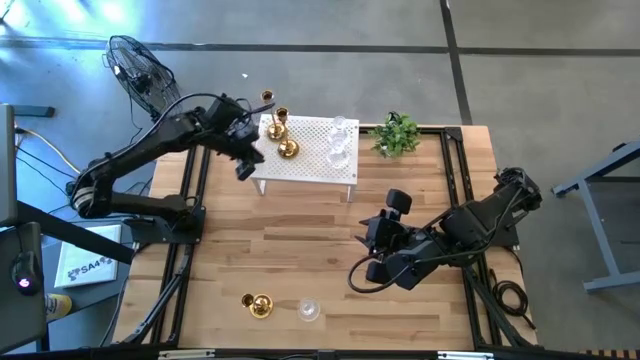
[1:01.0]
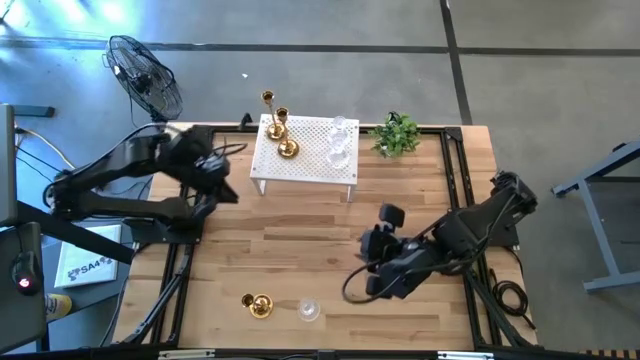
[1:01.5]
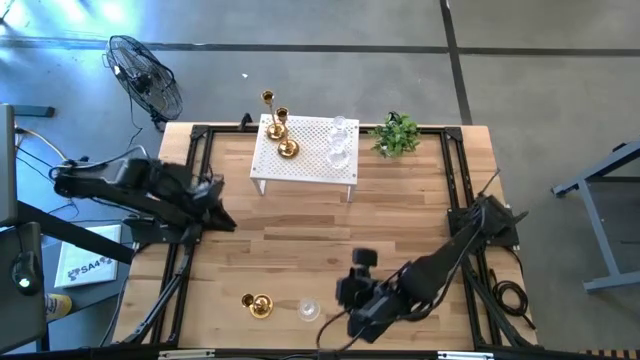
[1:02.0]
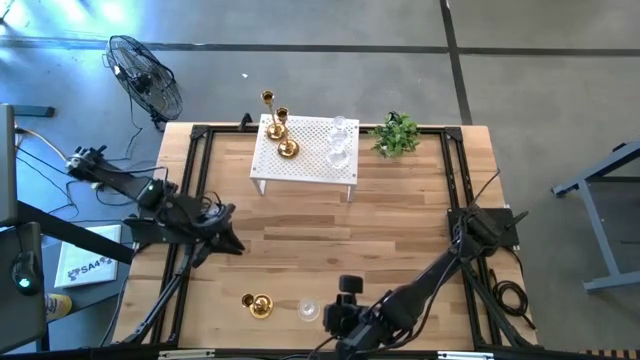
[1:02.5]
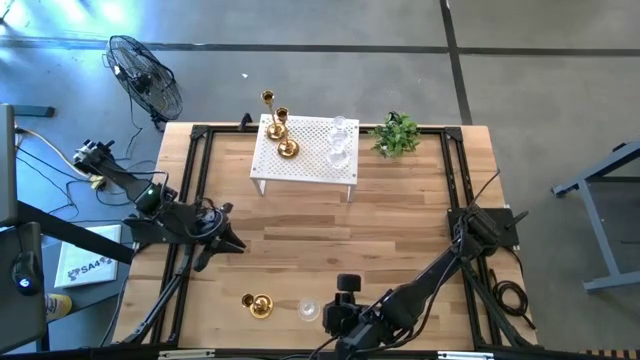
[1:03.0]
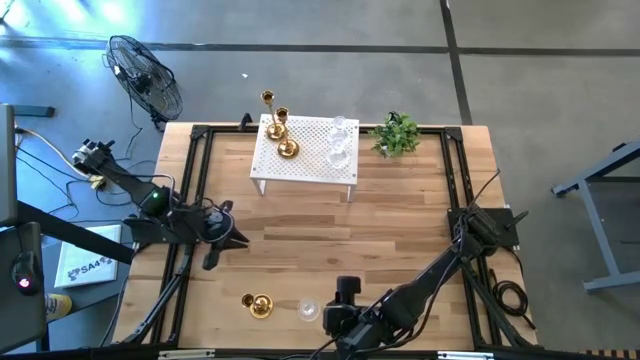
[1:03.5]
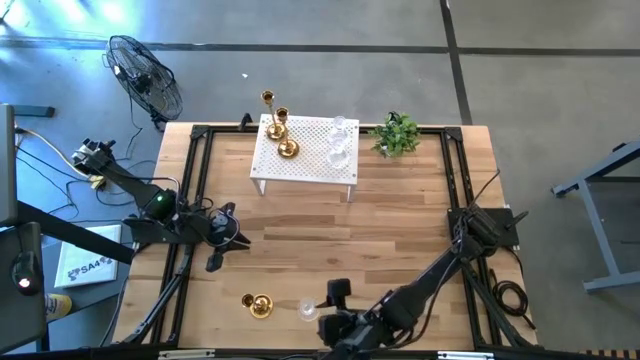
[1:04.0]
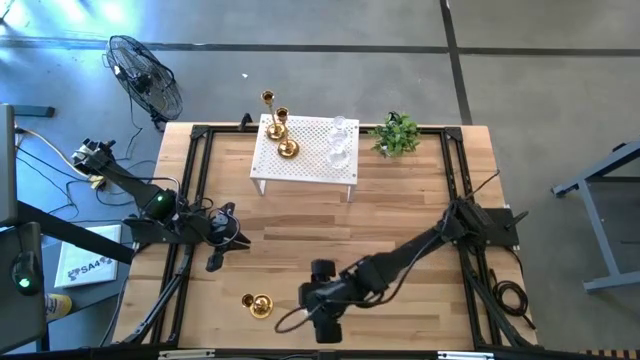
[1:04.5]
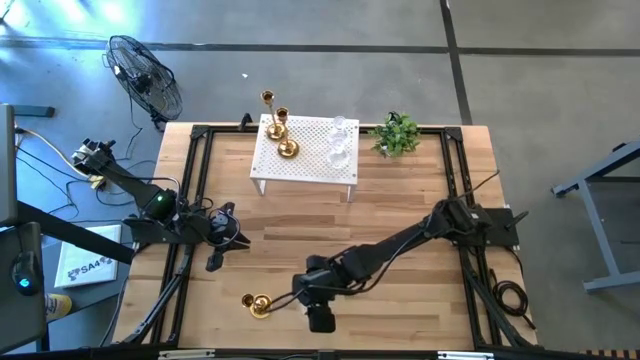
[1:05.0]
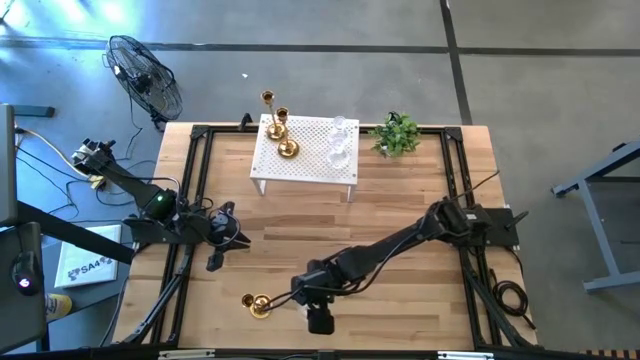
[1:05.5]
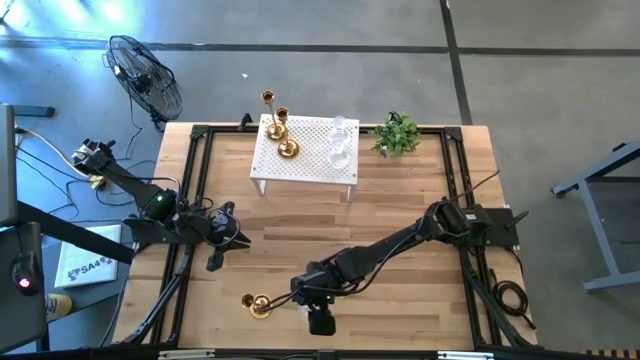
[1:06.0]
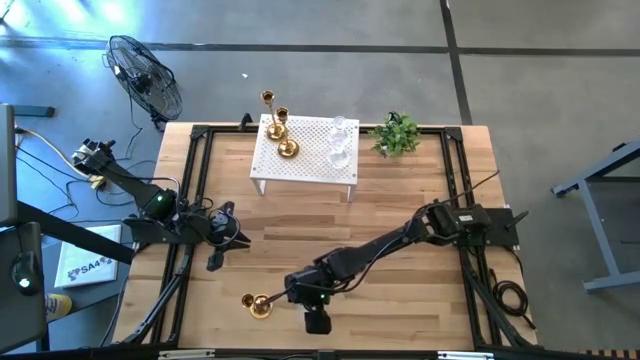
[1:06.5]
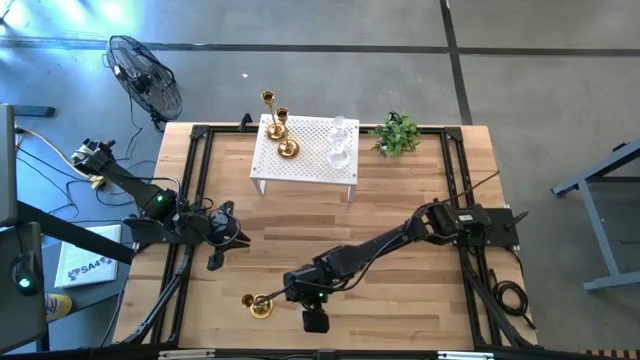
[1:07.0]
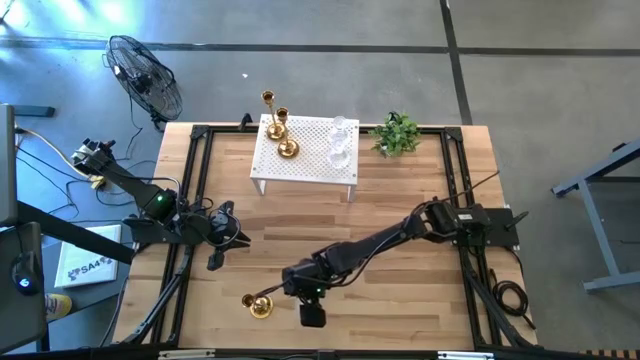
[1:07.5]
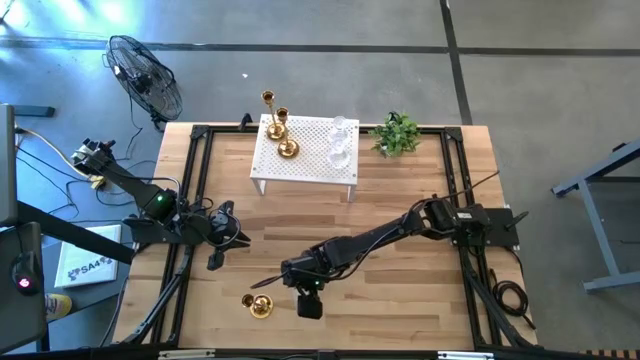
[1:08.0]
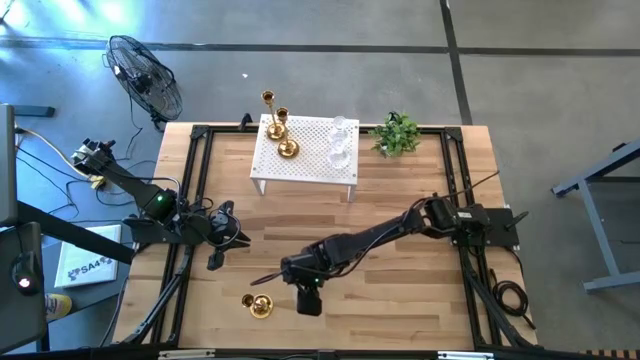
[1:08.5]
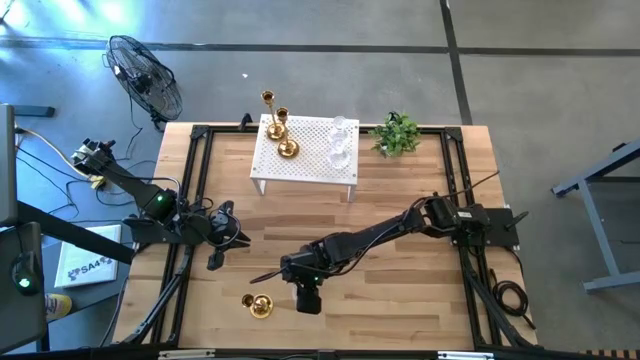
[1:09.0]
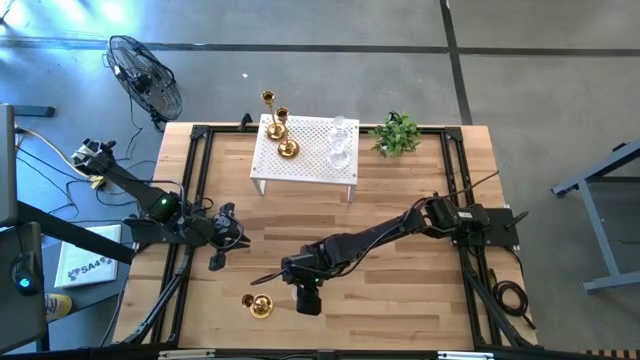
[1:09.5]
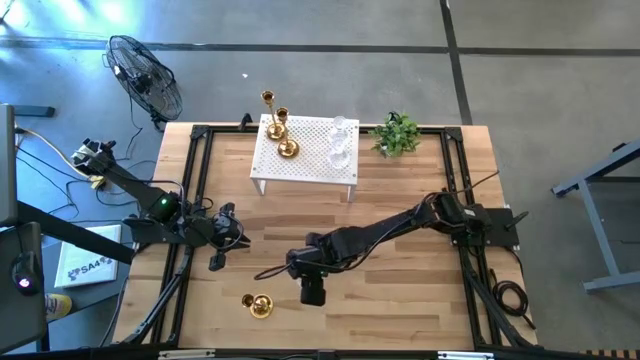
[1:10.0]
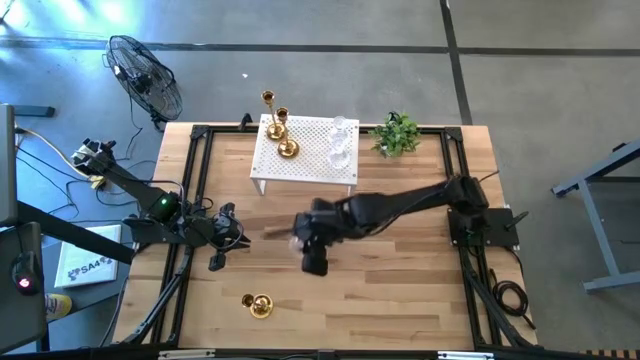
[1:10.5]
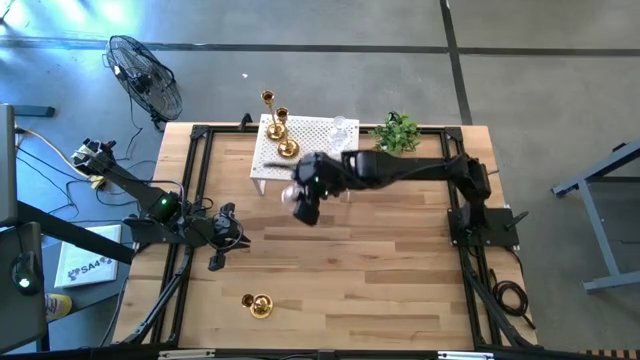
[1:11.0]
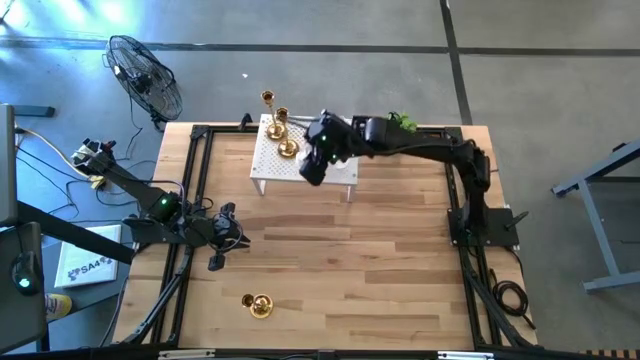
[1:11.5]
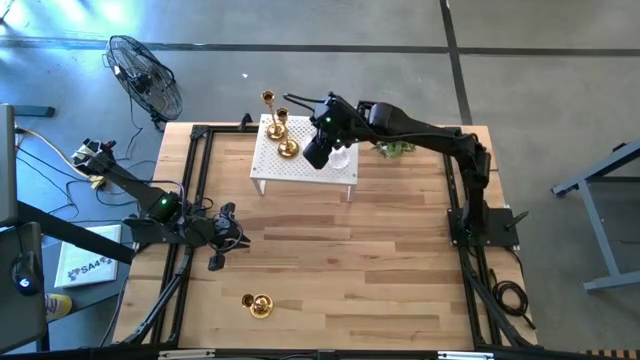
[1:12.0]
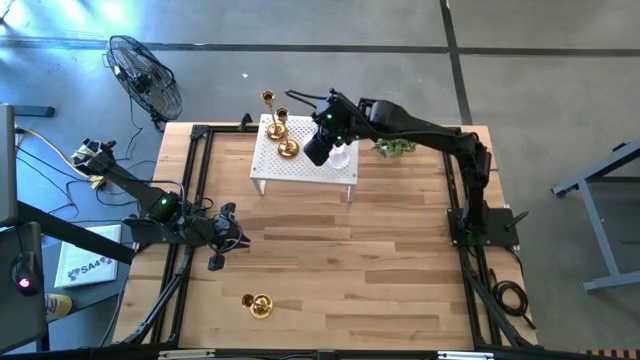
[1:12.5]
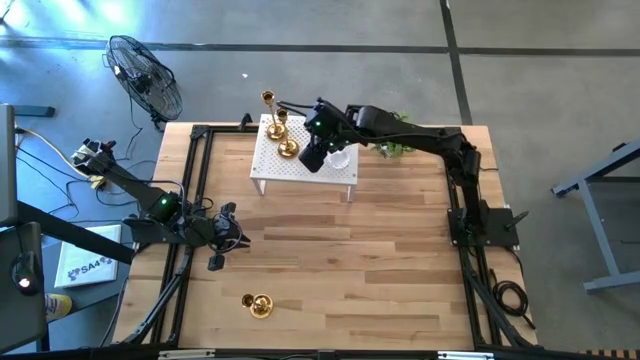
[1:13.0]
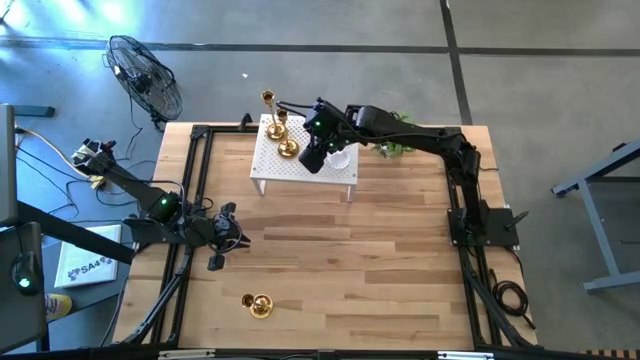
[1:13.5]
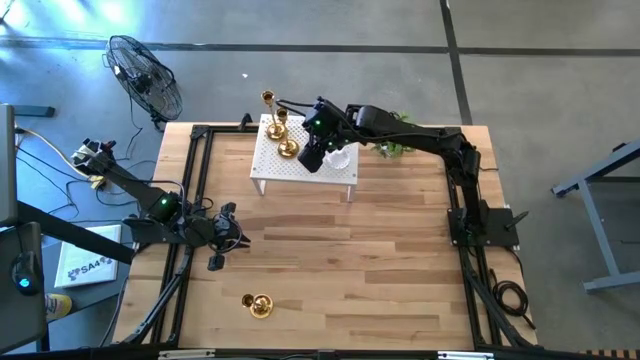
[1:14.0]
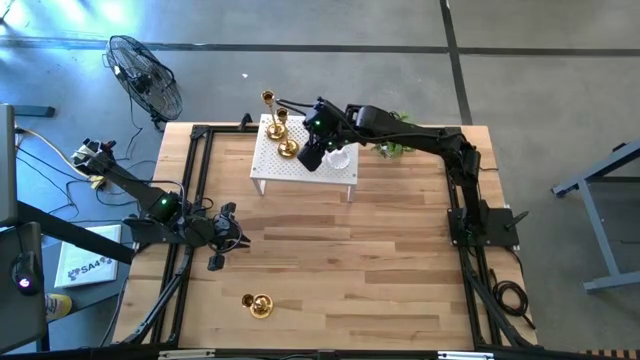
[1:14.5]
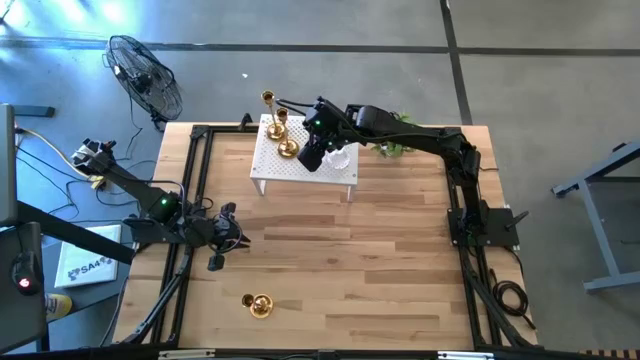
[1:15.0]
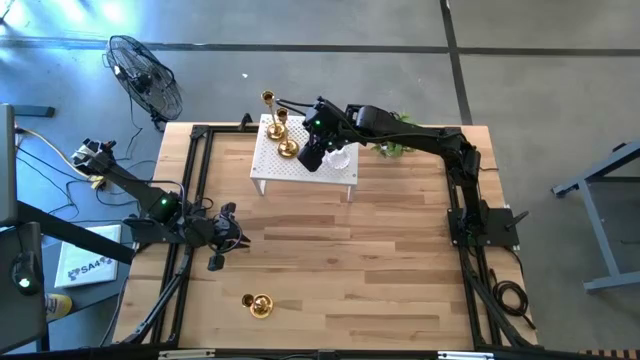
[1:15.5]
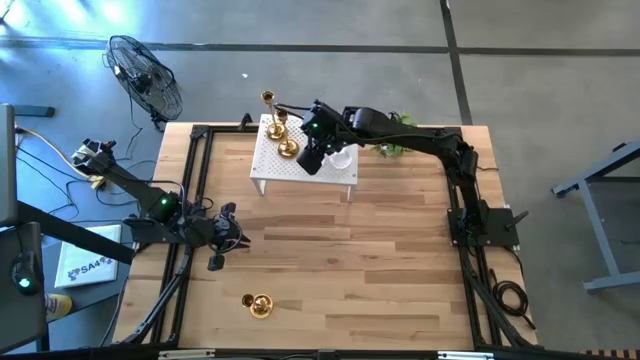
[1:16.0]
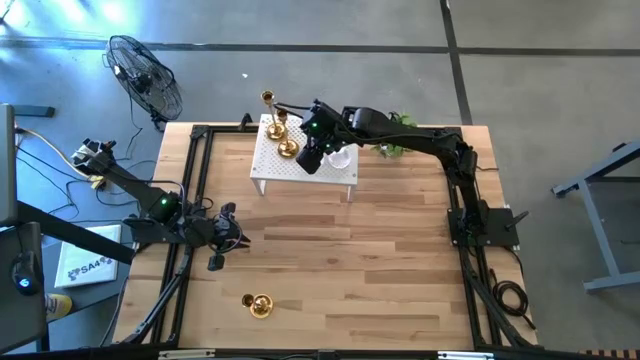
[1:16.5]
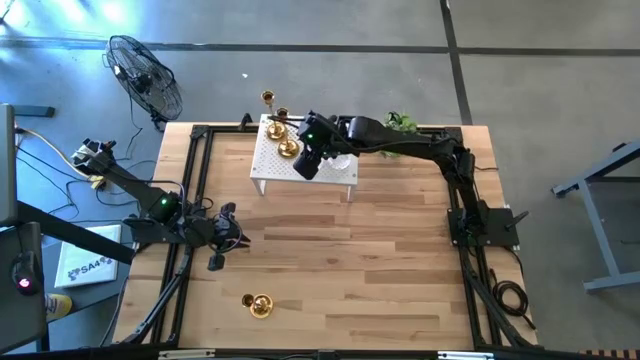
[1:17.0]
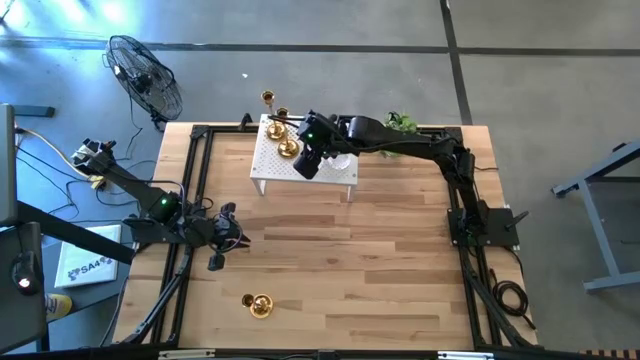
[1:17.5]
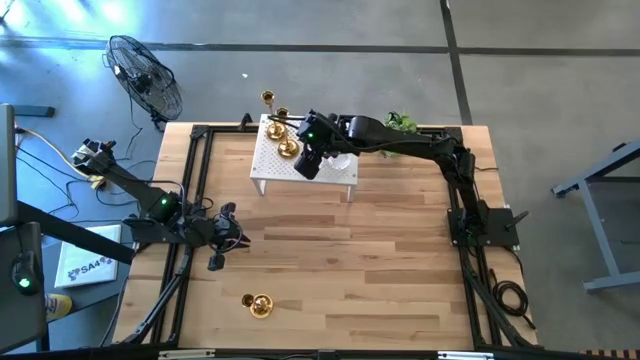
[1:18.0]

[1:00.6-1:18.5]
Task: Pick & Place candle stick holders
Put the transparent candle holder on the shelf

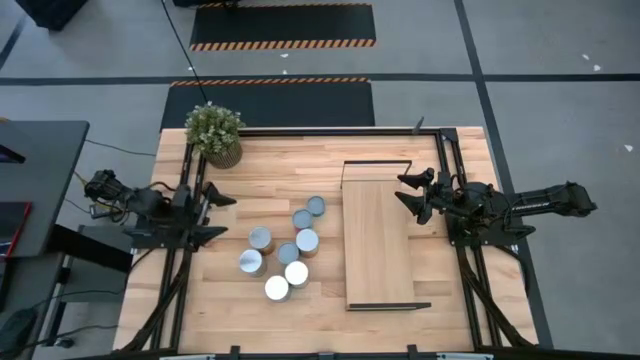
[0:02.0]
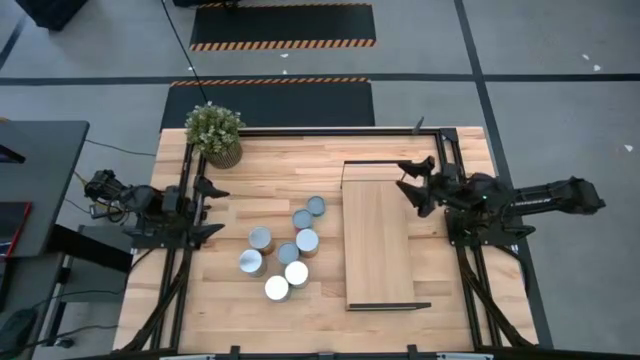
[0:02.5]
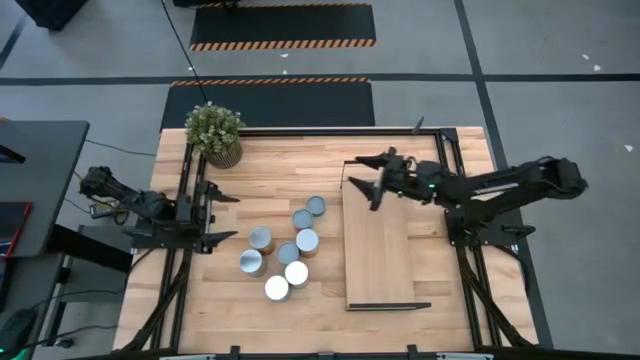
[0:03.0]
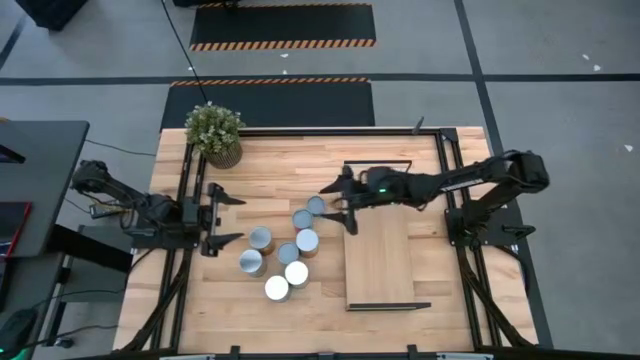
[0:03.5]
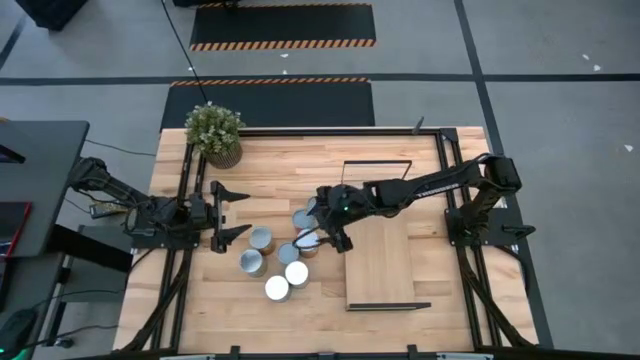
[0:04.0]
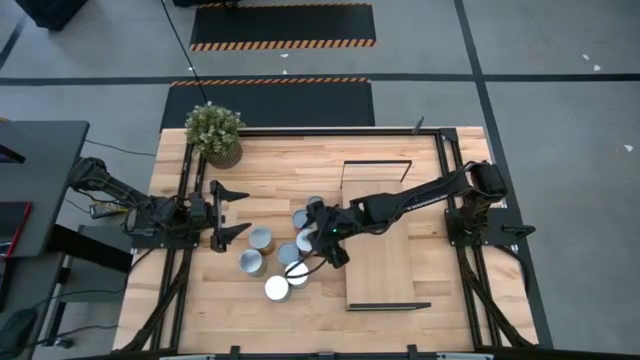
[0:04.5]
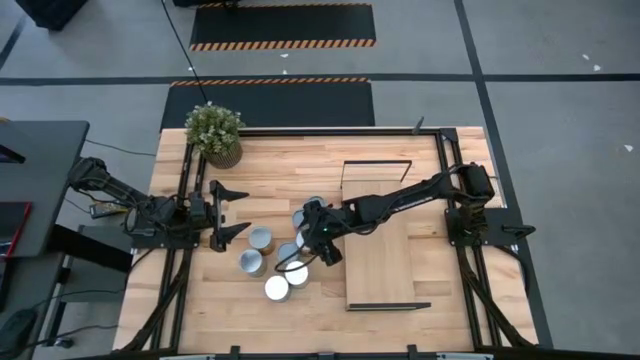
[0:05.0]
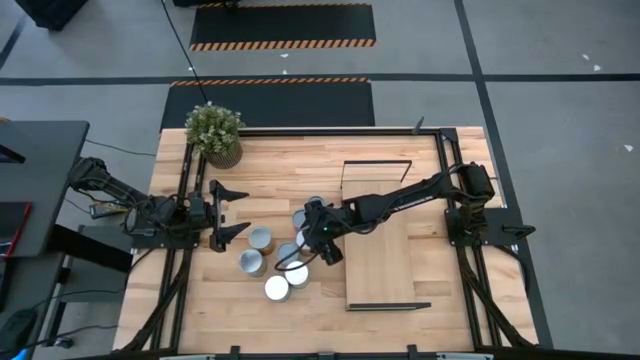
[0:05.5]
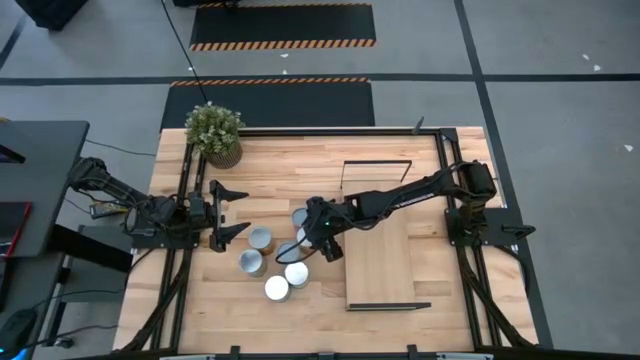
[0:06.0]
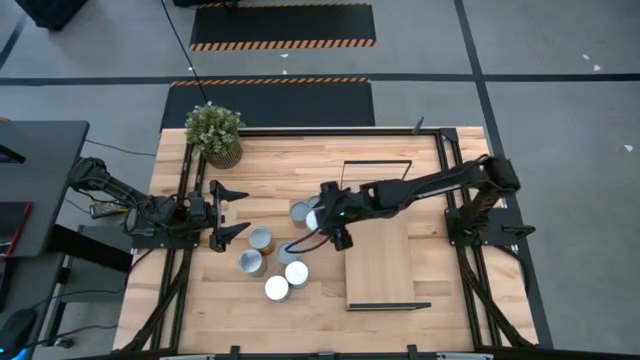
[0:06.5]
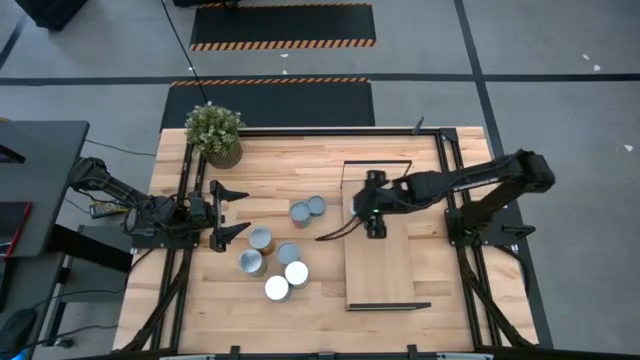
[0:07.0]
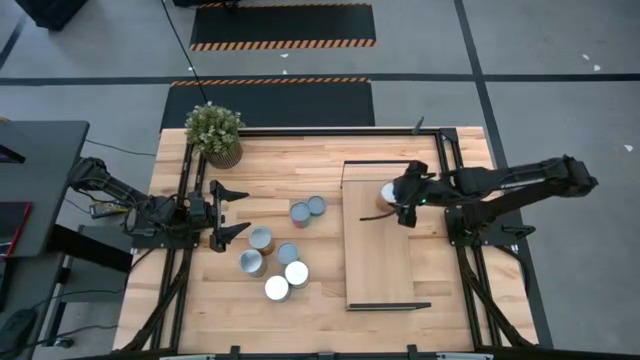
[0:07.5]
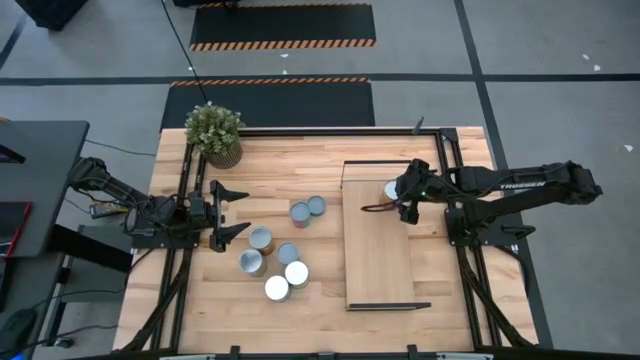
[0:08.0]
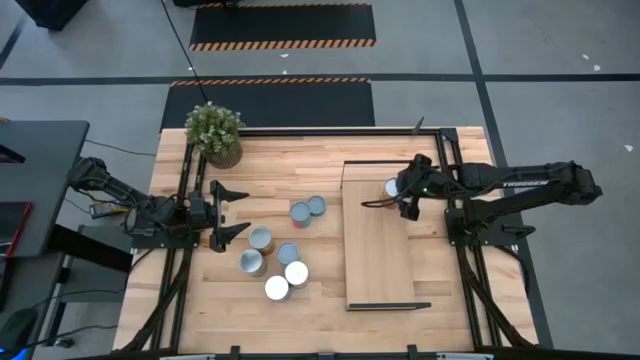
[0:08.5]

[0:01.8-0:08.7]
Task: Pick and place cans onto a shelf
Put the canned corn on the shelf
